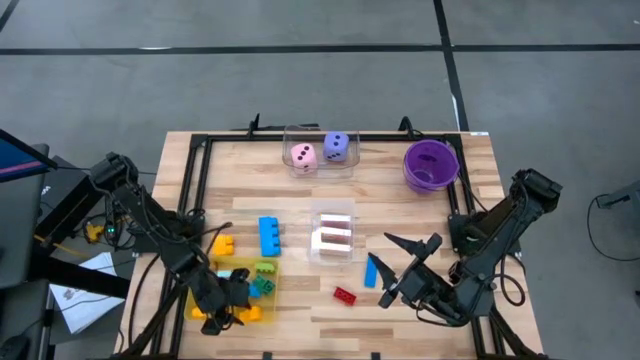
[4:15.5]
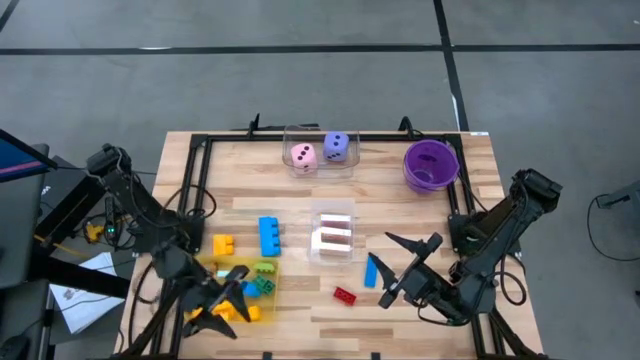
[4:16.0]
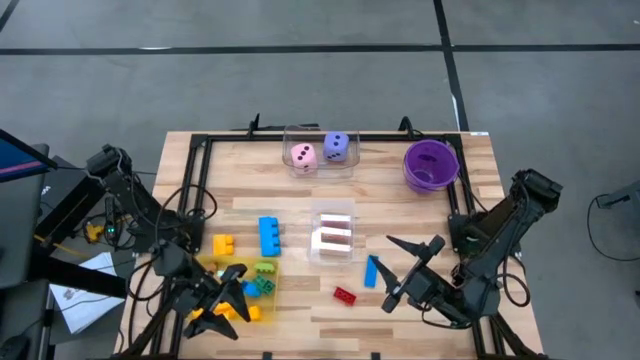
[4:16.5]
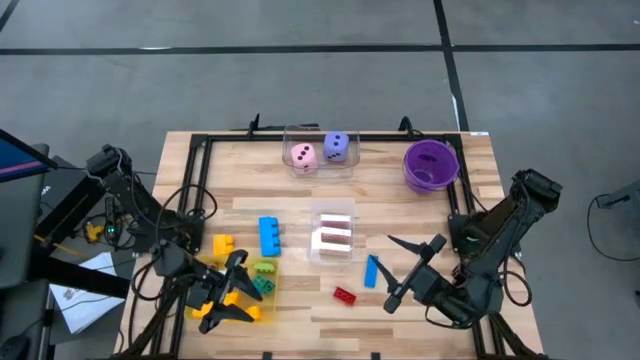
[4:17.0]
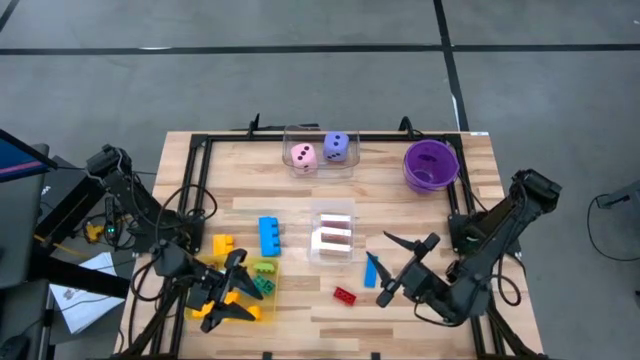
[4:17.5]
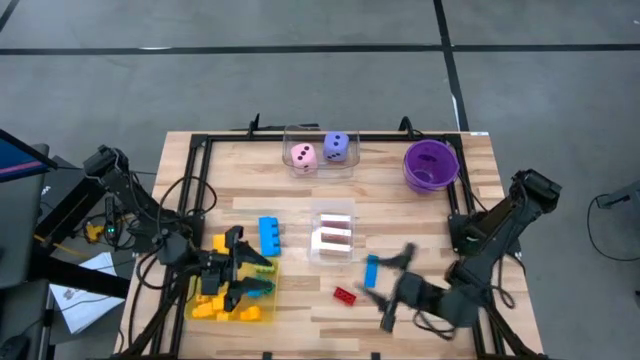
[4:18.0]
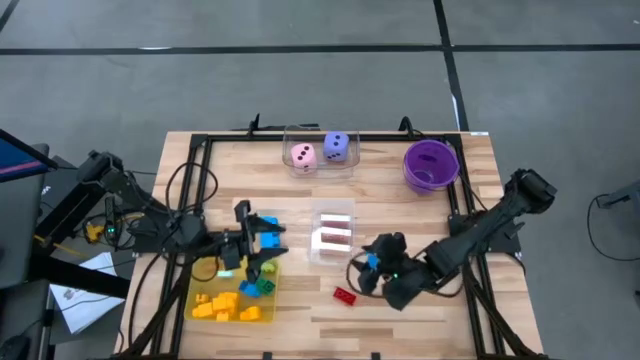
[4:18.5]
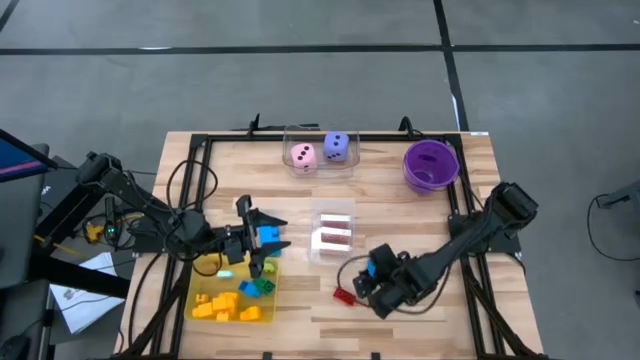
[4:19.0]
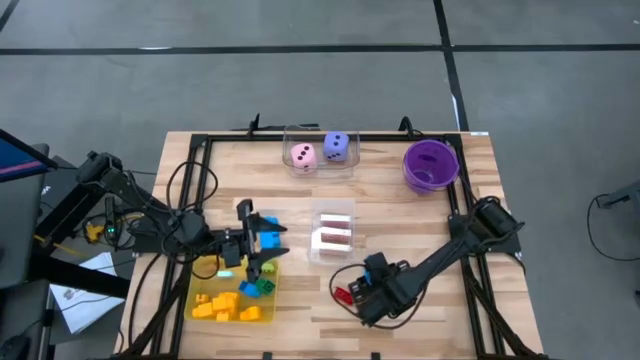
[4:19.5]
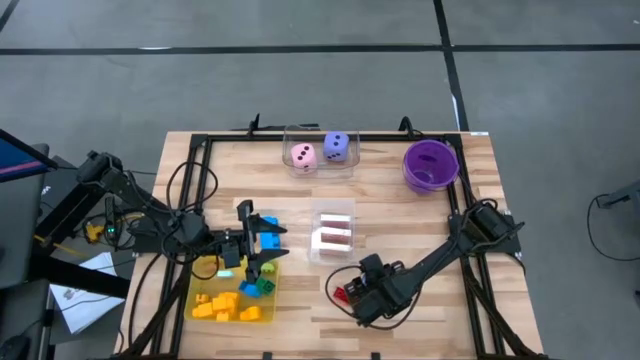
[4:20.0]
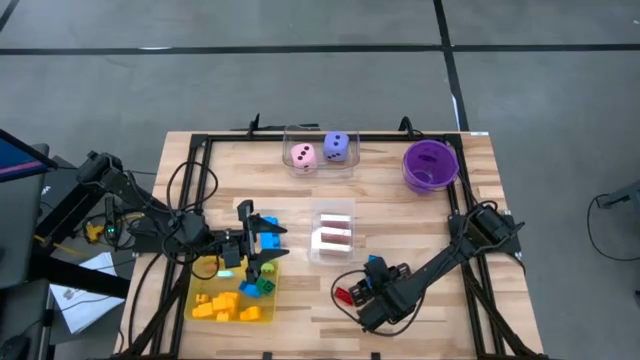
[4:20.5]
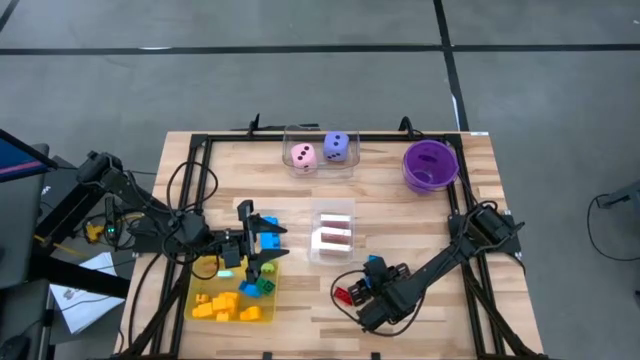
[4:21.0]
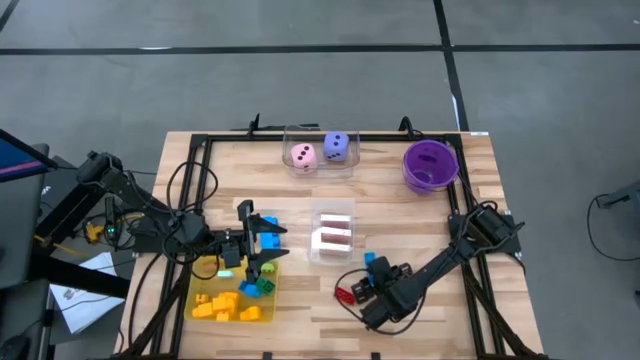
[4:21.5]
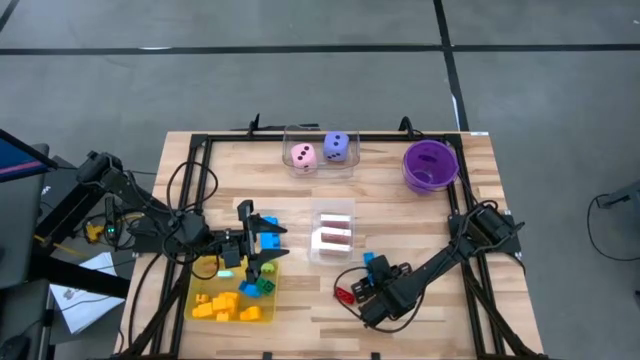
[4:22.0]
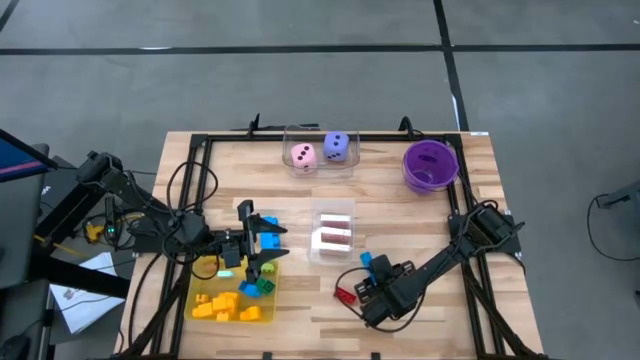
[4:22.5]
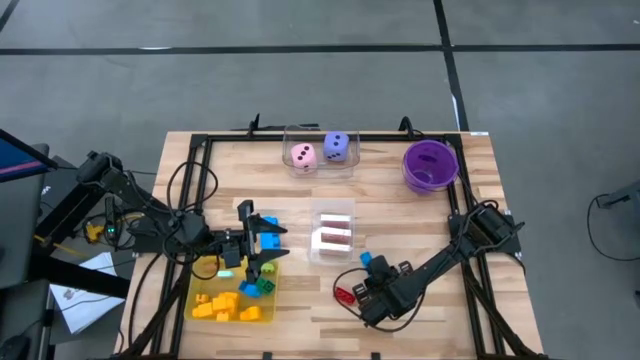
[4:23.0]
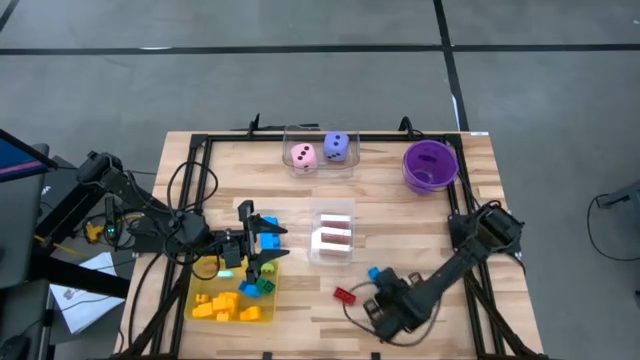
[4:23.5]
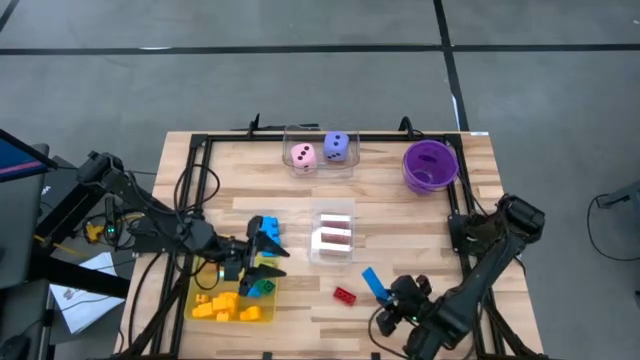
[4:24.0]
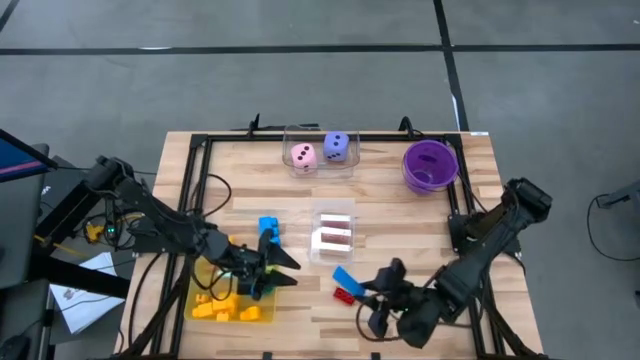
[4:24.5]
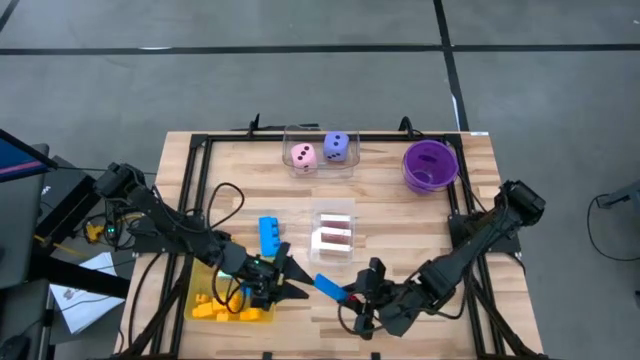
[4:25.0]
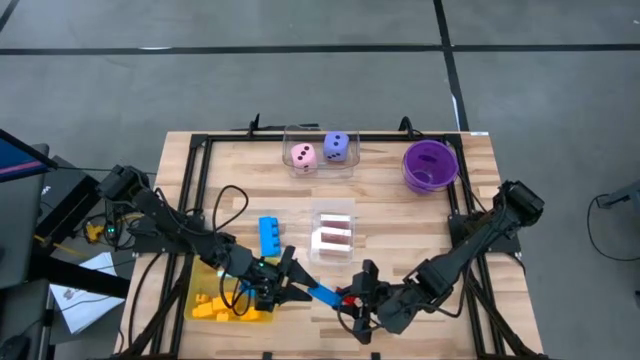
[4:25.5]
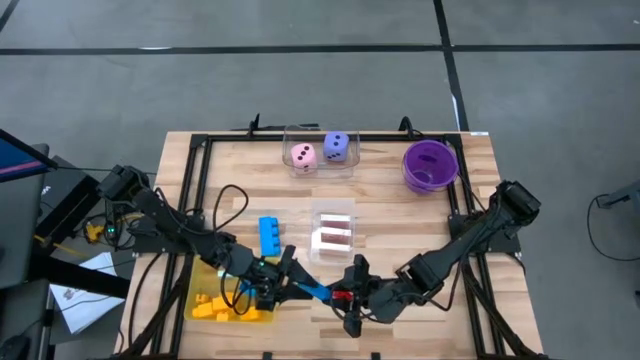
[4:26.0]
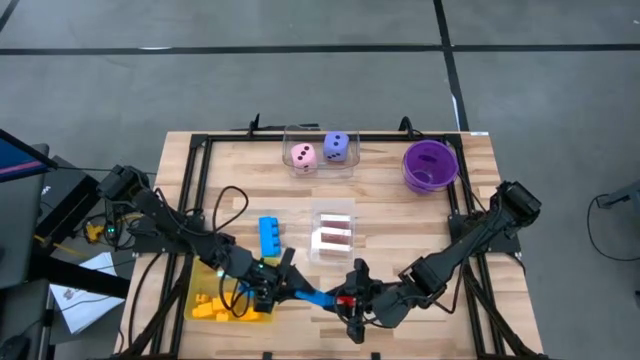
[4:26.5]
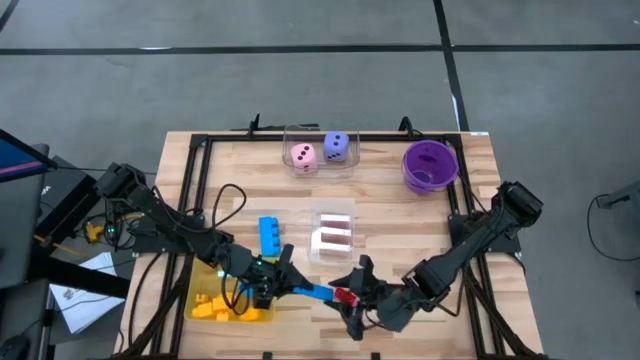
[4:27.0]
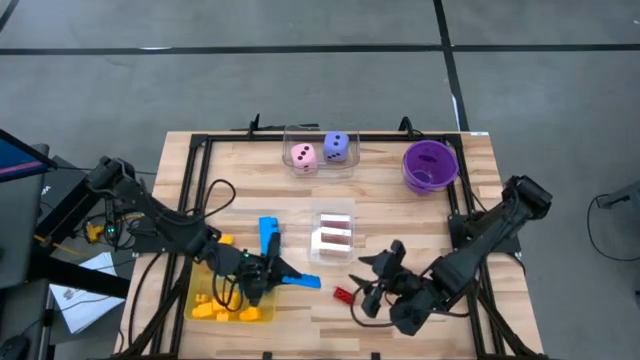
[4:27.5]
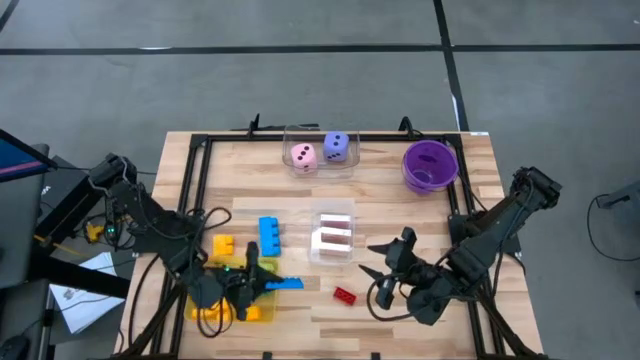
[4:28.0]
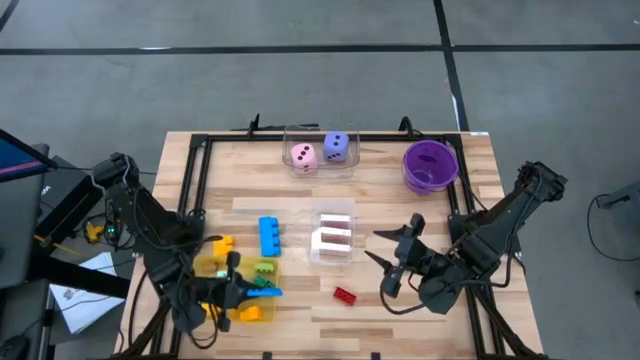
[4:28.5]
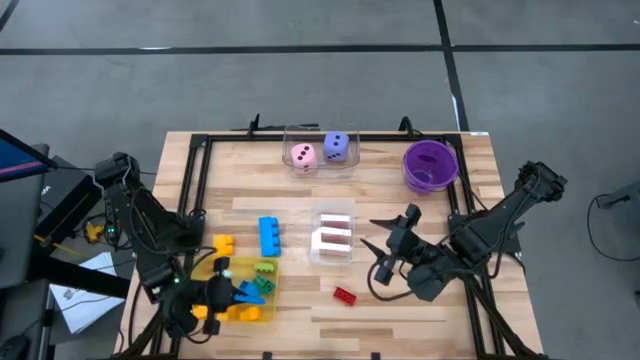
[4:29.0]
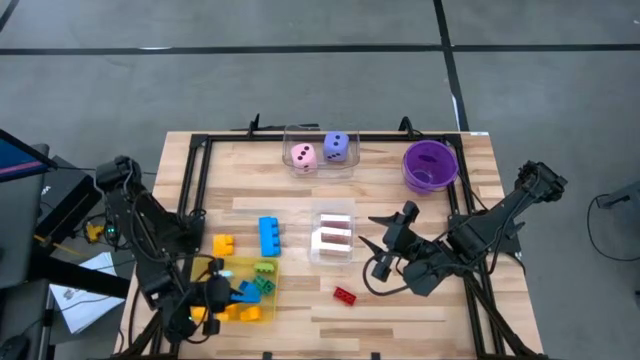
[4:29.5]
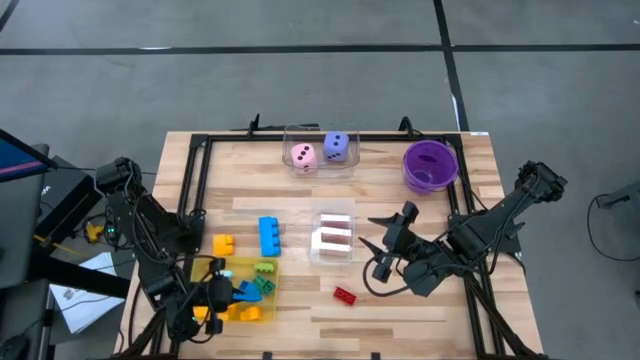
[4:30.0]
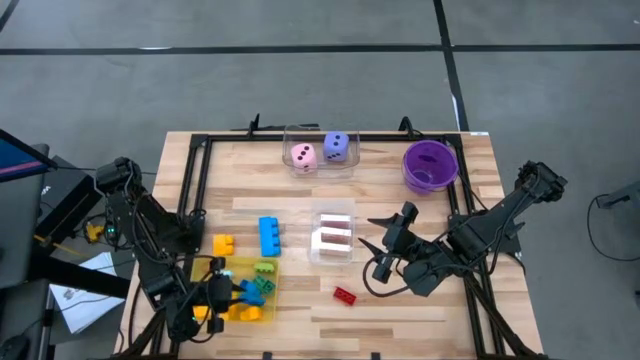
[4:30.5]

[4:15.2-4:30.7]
Task: Pick & Place Toys
Put the blue game piece into the yellow bin

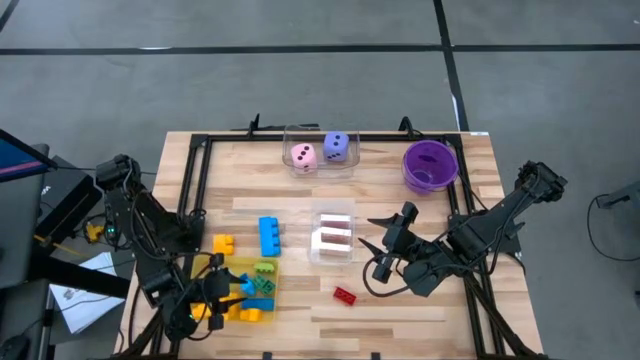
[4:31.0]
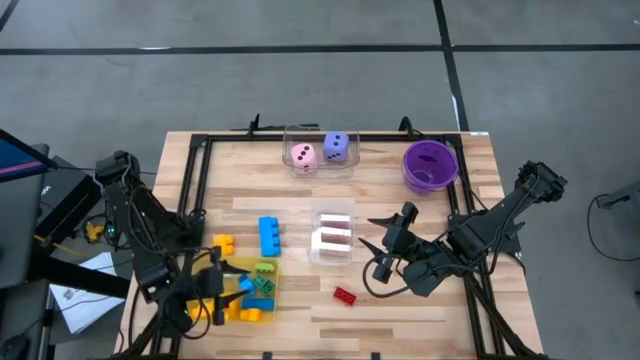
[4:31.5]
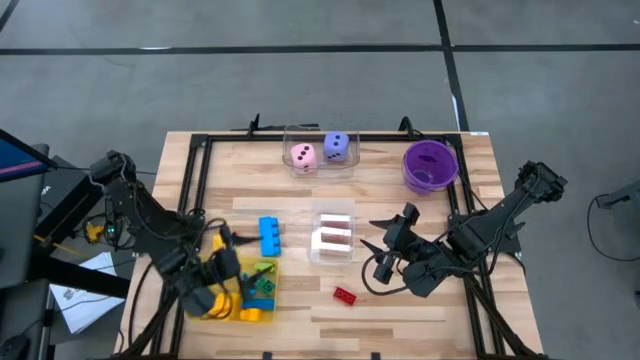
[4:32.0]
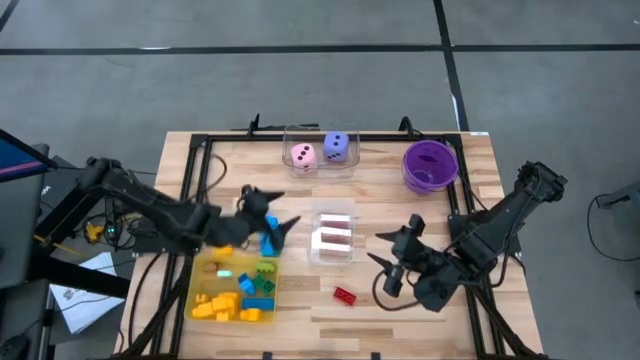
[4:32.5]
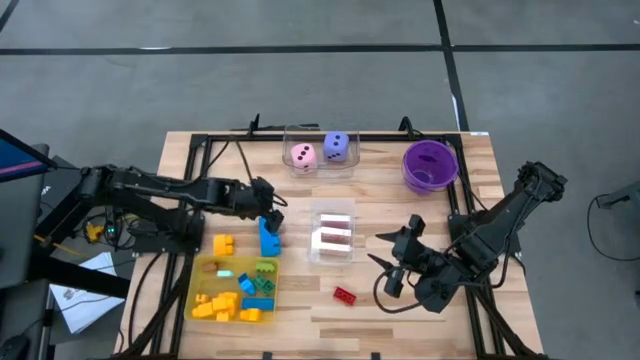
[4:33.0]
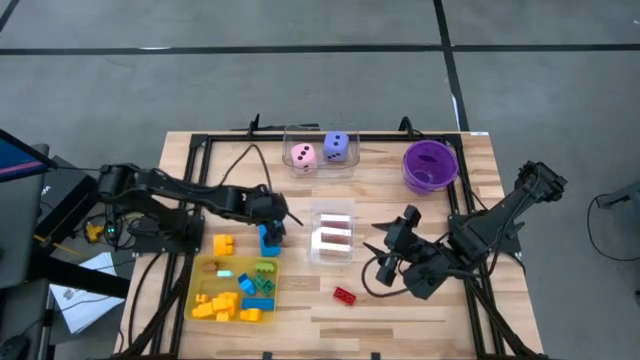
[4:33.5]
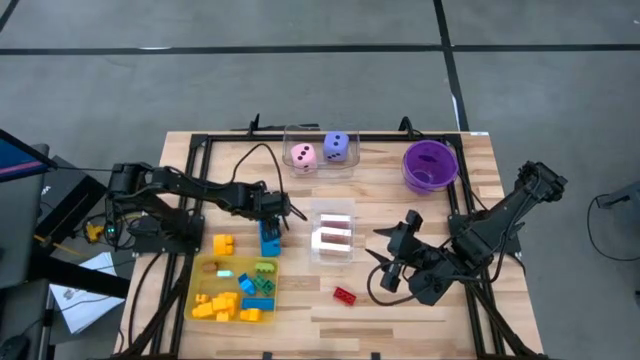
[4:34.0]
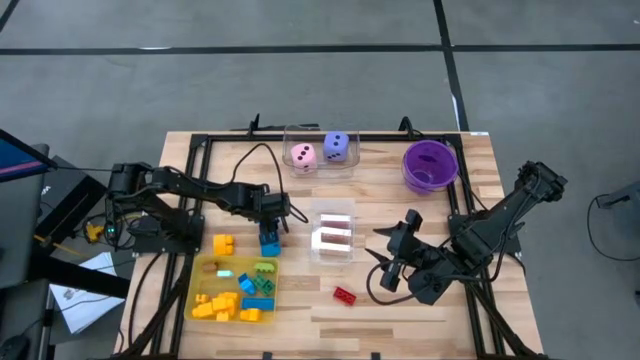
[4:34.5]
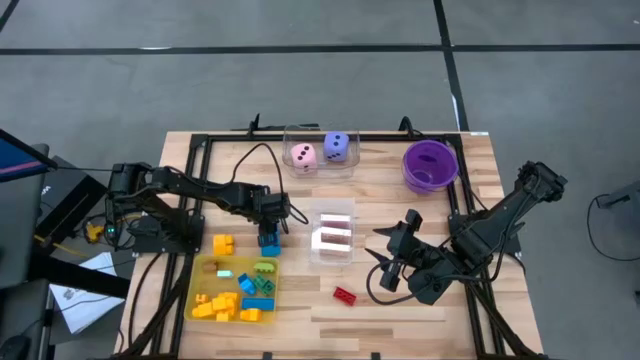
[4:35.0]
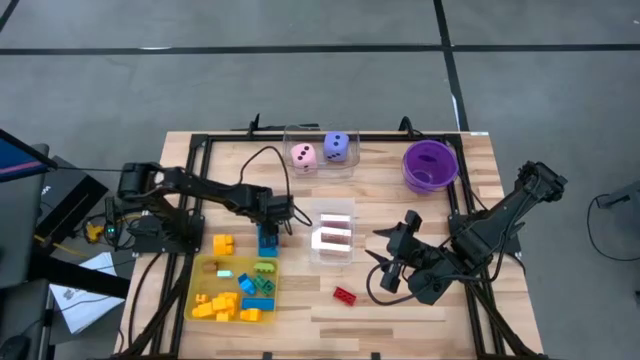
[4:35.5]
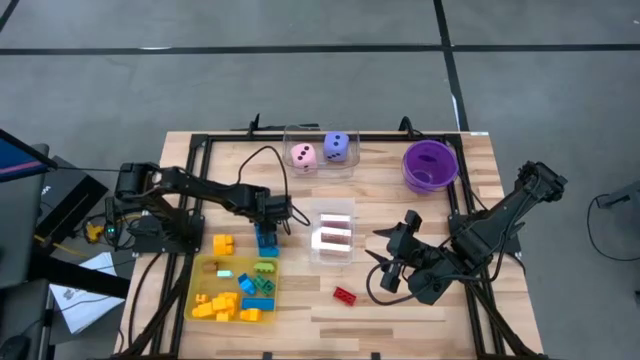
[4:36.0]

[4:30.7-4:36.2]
Put the light blue game piece into the yellow bin

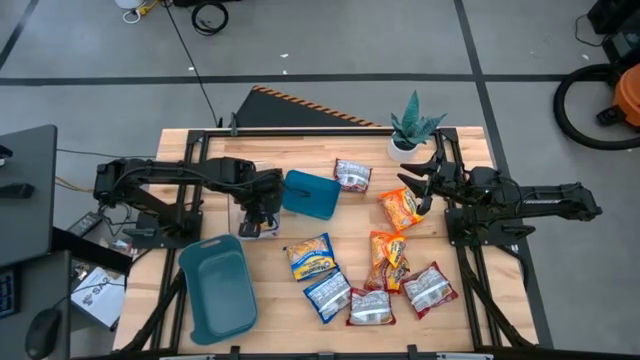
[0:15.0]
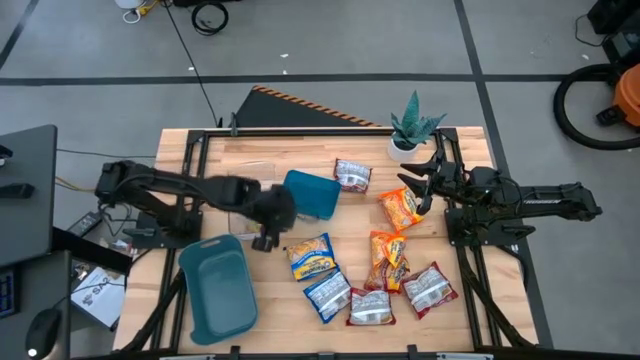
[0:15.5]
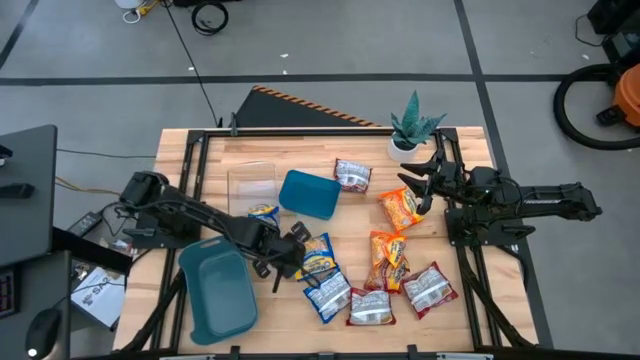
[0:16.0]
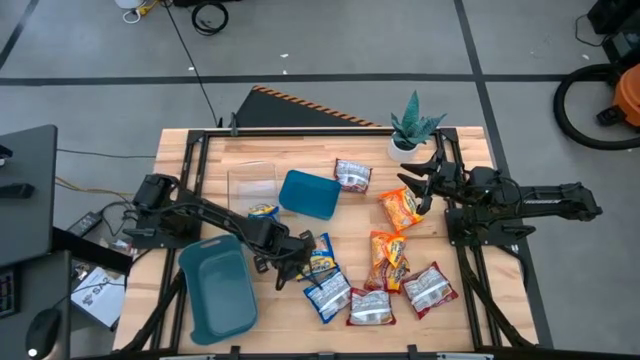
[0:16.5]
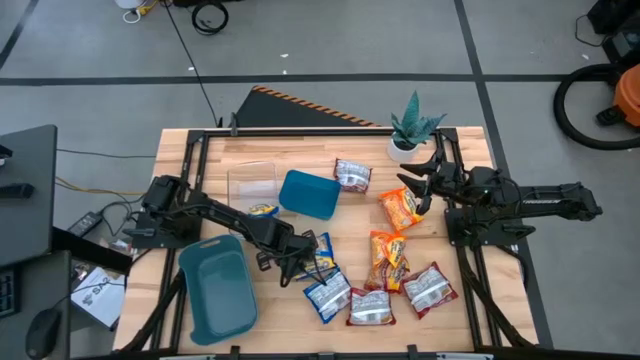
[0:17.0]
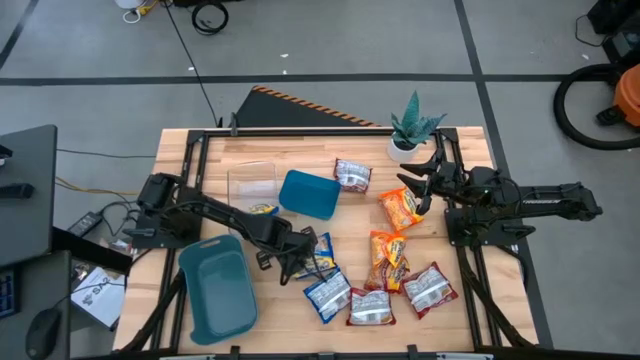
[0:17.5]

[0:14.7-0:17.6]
Task: Sort Maruchan noodles
Put the top blue noodle pack into the transparent bin
